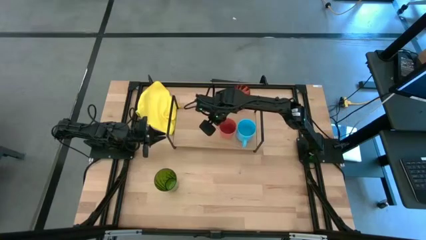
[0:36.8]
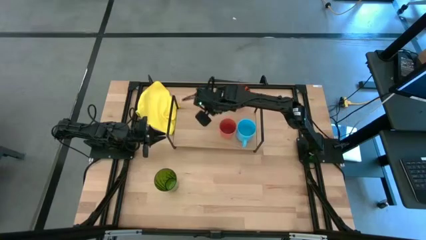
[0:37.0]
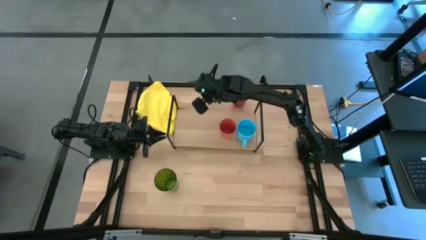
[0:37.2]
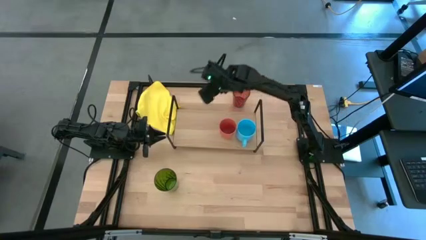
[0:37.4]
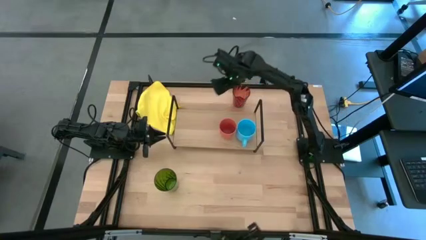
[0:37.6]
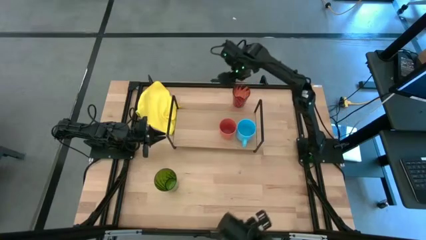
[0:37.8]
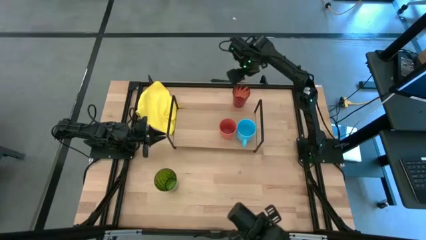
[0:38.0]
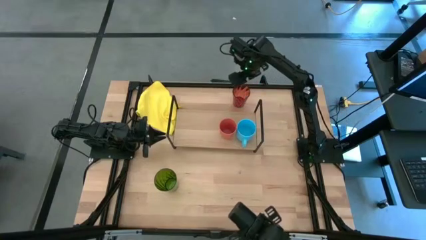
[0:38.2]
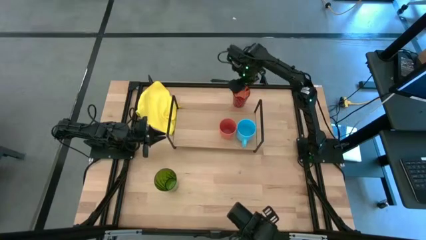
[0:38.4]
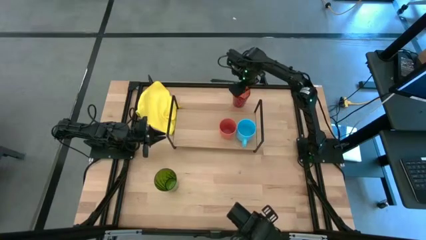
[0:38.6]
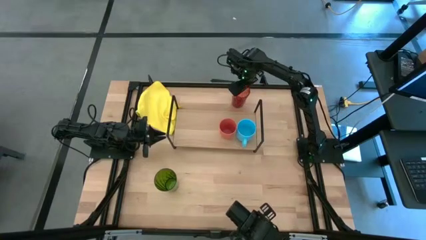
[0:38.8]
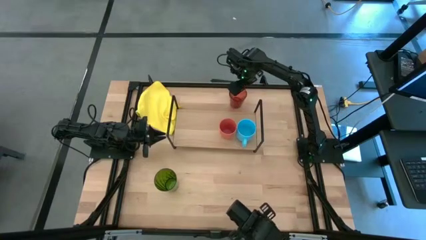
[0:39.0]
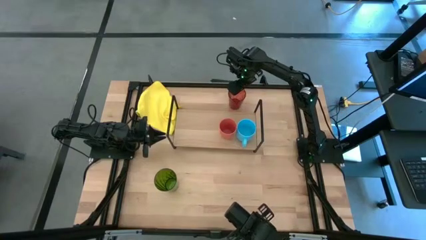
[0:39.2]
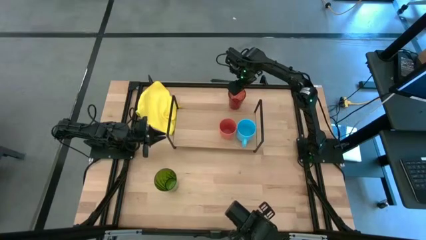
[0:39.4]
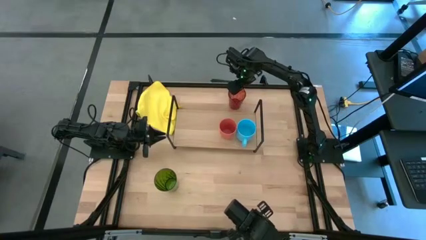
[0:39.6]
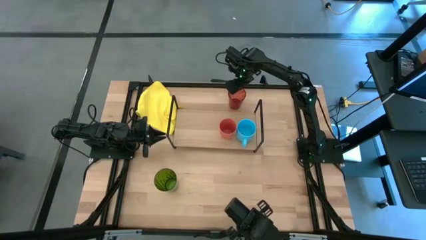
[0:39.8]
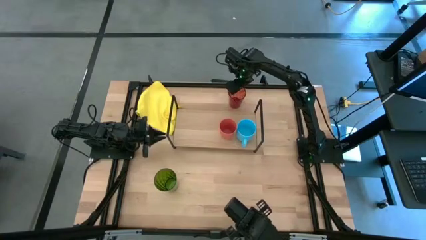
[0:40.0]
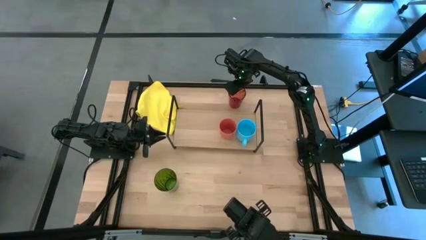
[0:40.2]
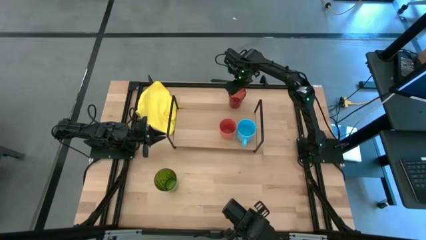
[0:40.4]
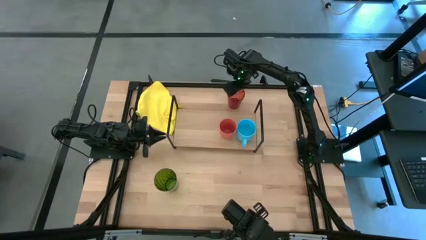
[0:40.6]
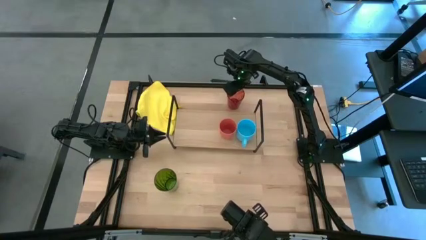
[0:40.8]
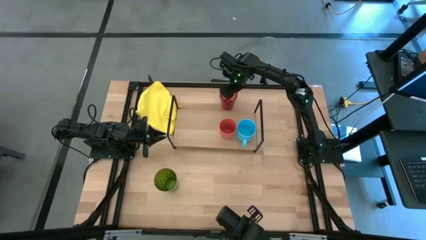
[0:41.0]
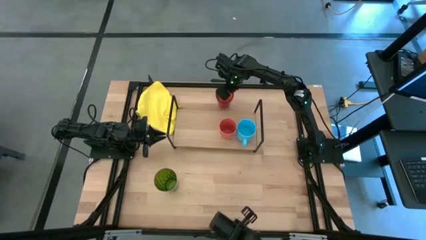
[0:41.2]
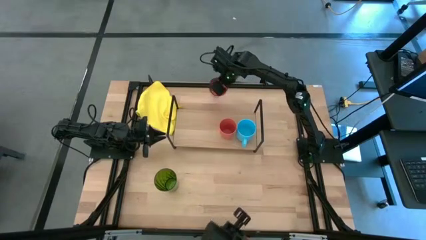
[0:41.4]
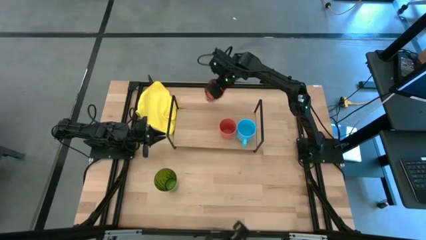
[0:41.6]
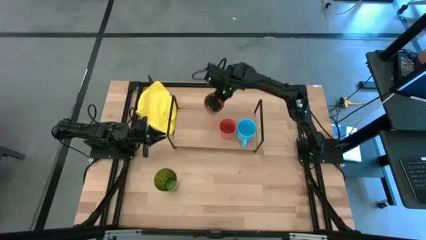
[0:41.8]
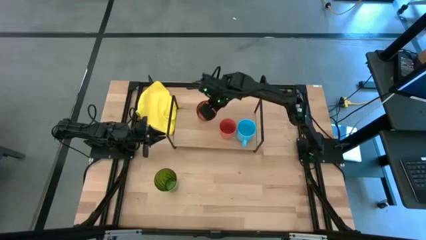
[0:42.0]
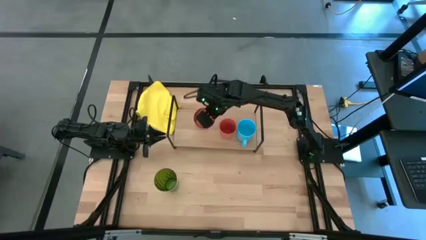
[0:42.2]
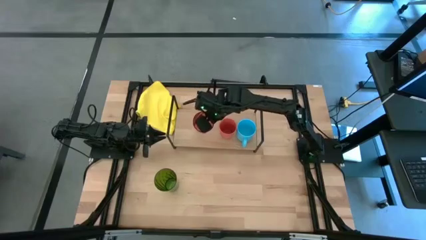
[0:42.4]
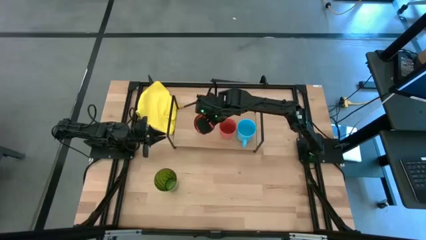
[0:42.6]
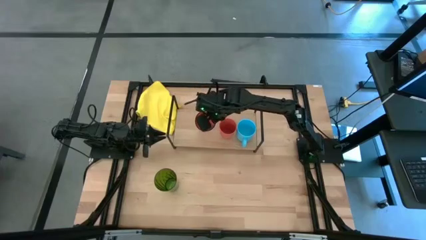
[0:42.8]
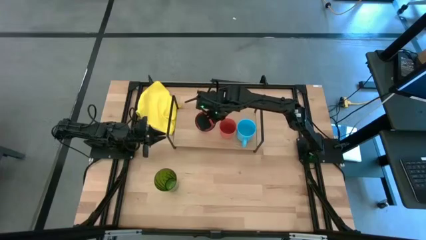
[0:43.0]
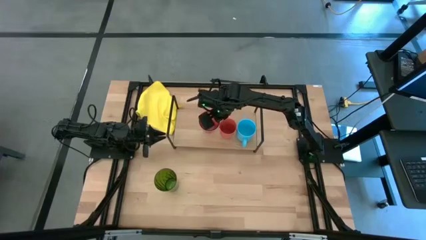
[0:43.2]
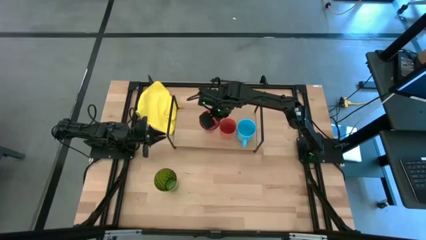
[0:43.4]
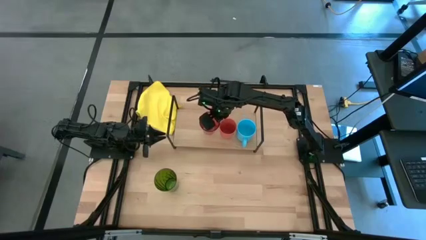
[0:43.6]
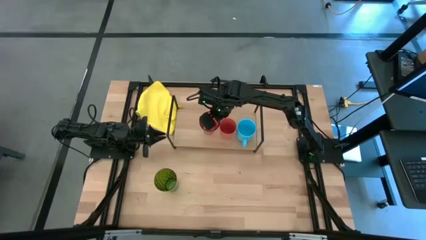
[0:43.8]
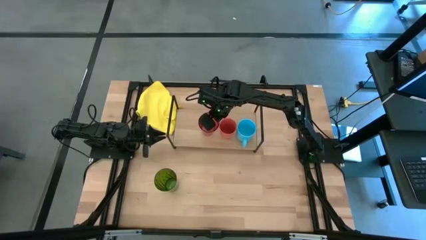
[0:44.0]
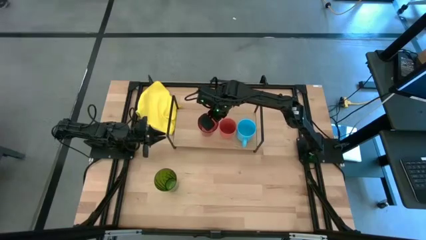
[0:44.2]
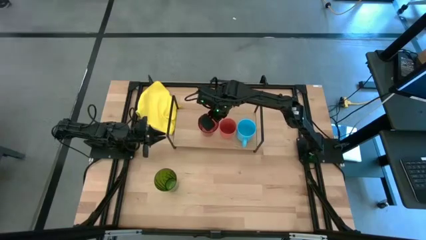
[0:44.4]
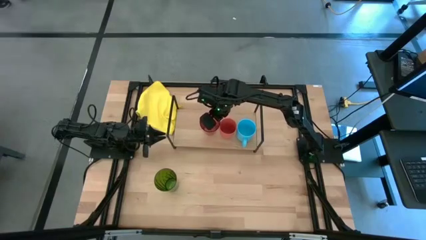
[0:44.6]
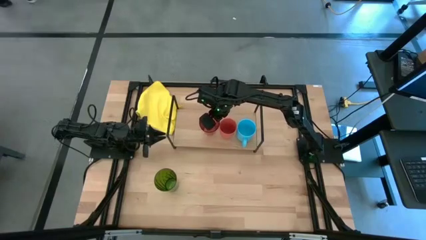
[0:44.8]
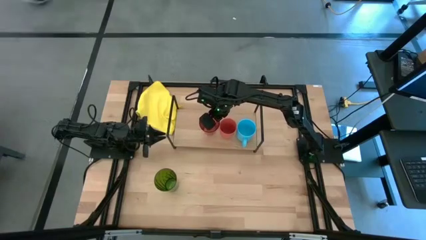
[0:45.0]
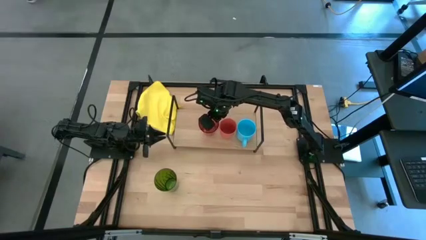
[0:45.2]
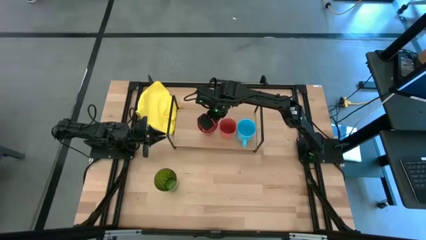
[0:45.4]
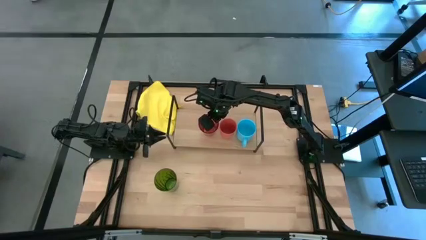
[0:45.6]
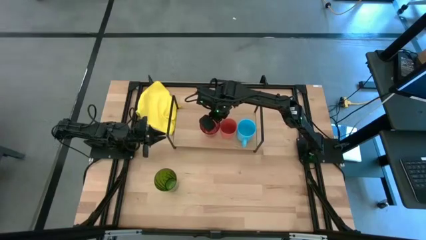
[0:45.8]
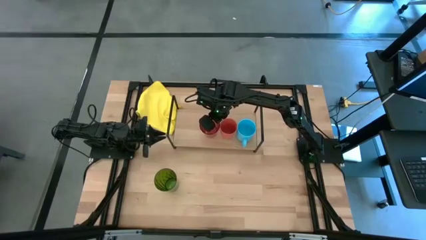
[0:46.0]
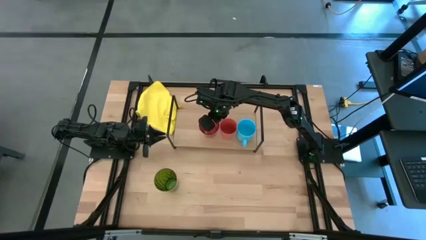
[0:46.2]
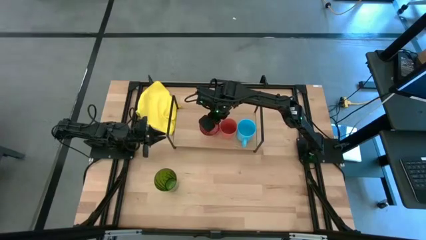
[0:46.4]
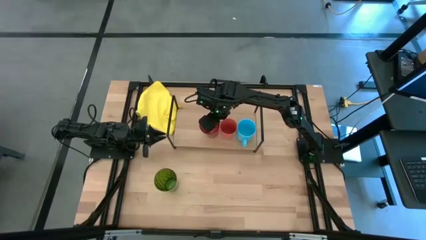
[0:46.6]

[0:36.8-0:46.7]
Task: Stack small to large cups/mugs on shelf
Put the red cup on the shelf

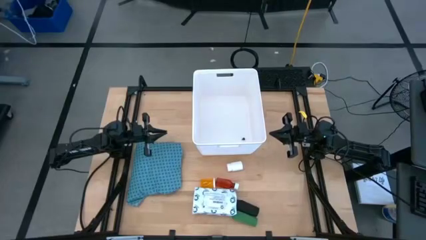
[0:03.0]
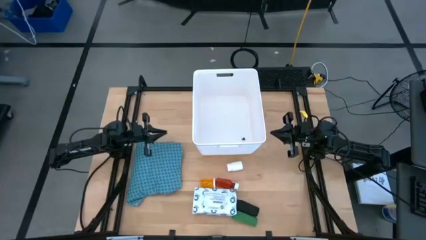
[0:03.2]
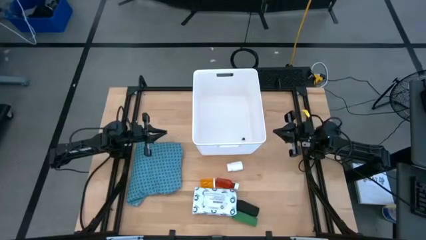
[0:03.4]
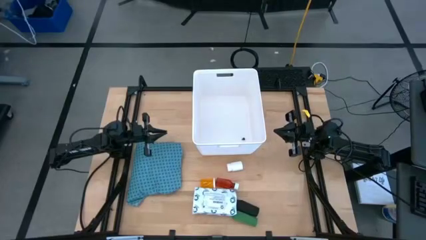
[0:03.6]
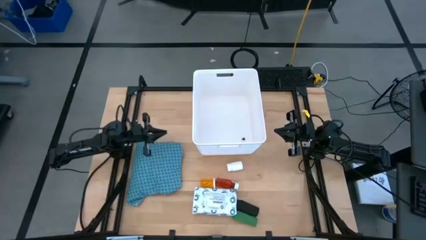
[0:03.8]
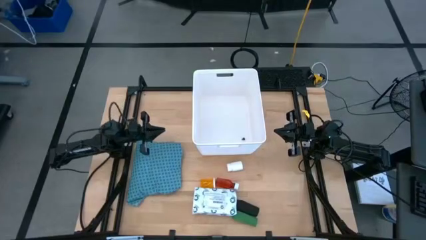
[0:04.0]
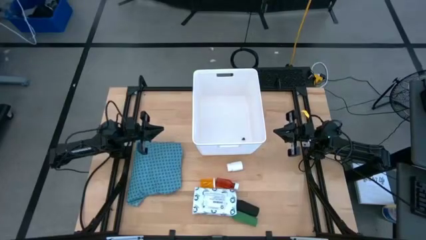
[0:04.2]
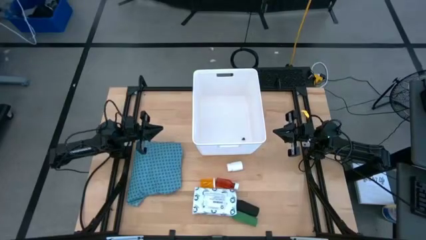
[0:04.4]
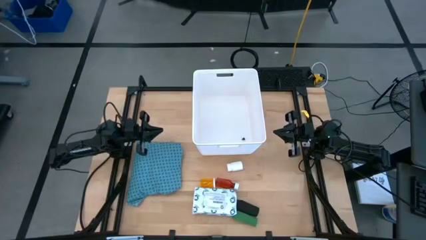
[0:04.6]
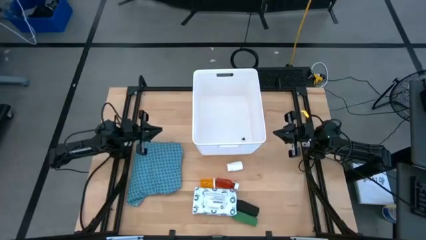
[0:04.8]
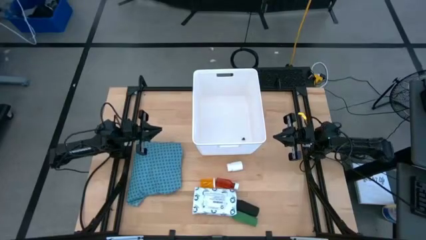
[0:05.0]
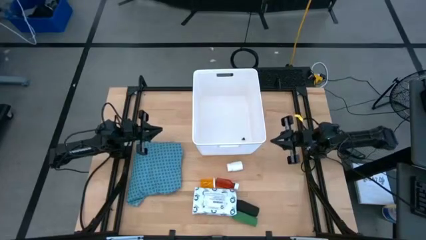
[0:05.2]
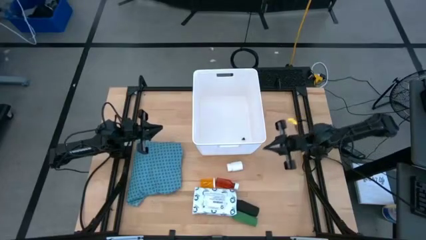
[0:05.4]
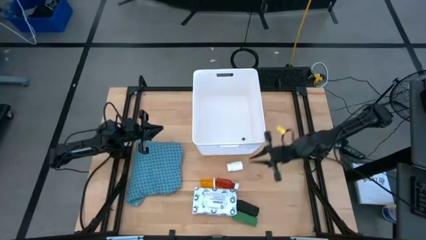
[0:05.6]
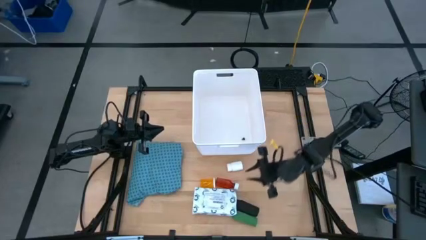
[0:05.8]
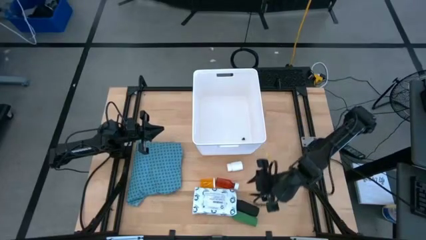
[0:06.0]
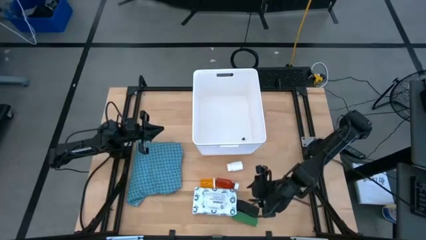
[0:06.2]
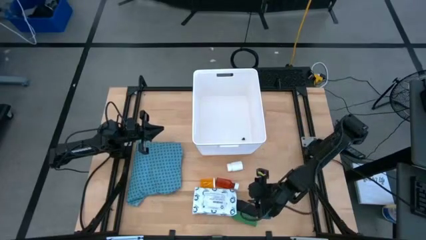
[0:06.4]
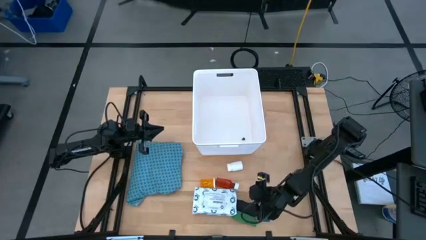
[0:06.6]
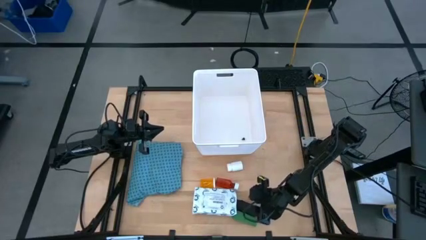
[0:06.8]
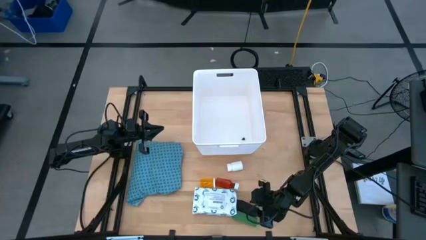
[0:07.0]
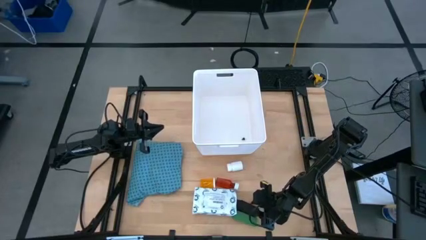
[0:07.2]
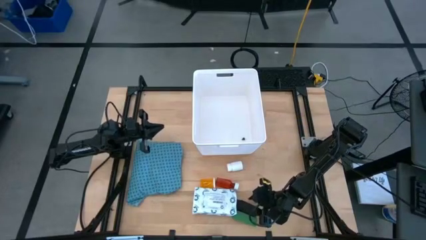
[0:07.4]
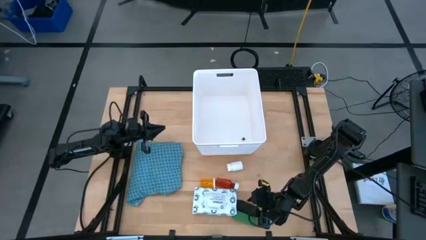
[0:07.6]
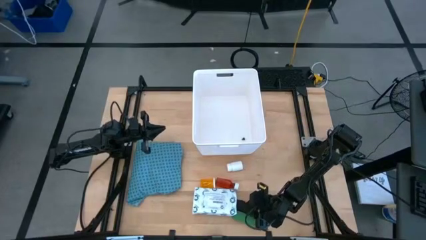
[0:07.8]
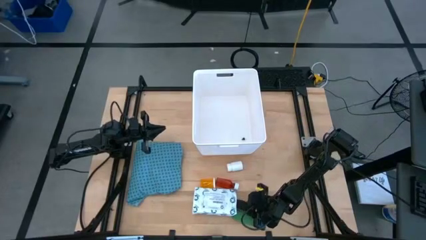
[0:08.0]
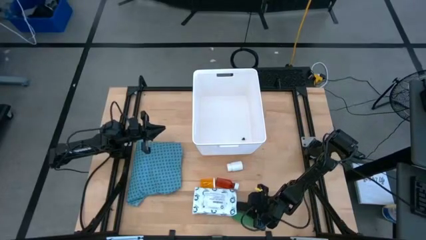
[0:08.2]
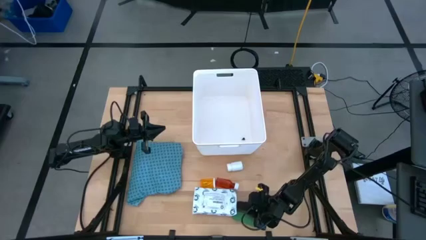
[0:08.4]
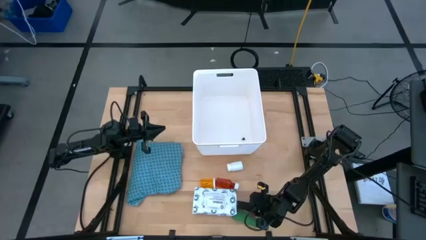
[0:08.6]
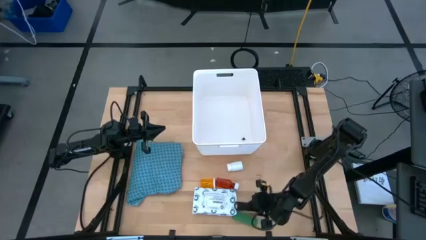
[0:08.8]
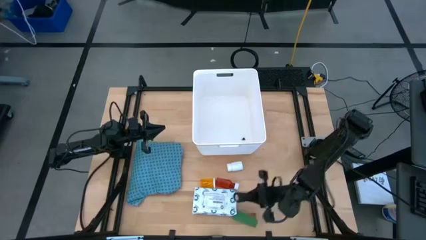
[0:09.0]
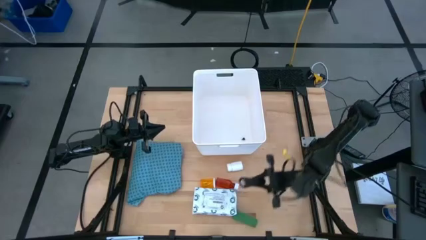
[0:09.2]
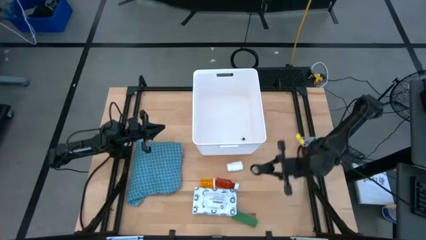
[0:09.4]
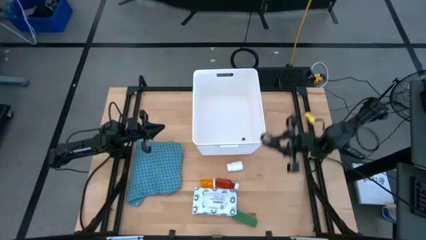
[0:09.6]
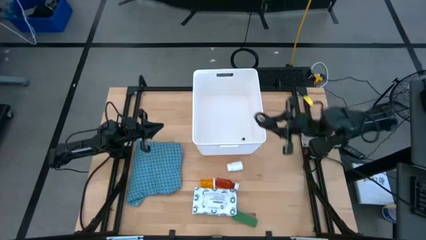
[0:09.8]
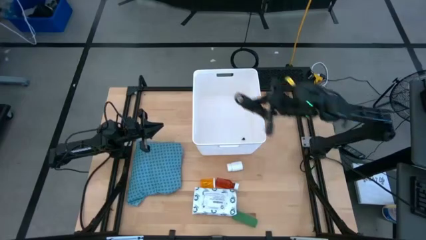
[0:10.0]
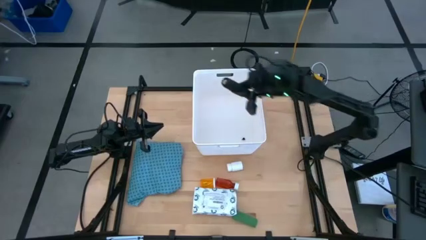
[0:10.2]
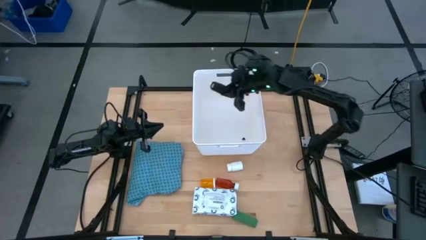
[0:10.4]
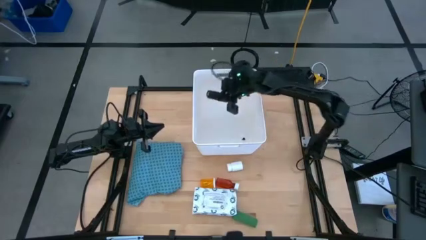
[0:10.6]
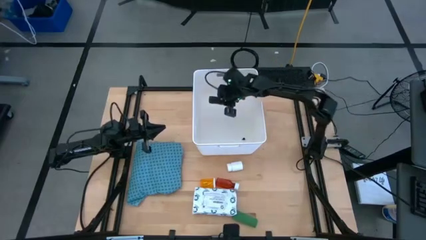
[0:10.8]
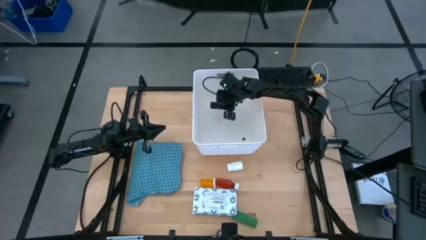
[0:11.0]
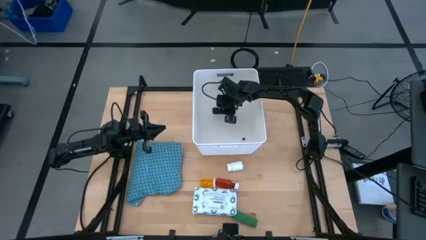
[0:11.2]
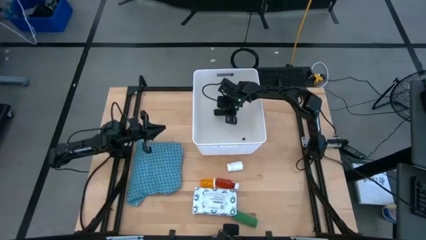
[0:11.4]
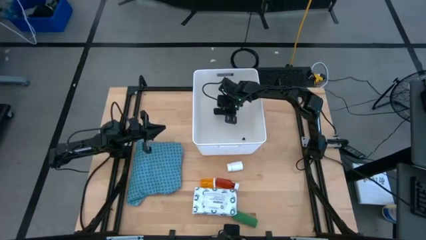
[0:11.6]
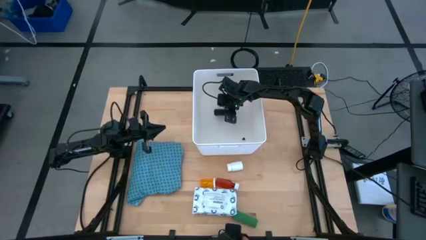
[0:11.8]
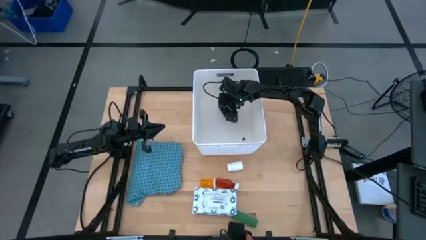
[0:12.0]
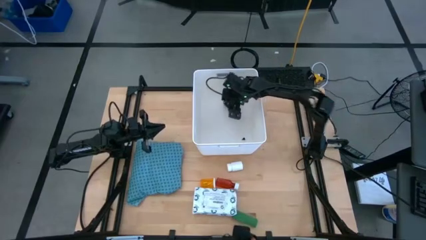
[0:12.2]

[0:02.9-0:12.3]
Task: Pick & place medical supplies in basket/bin
Put the black bandage in the white basket
